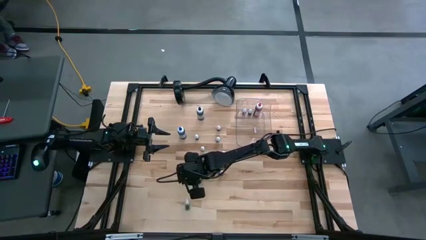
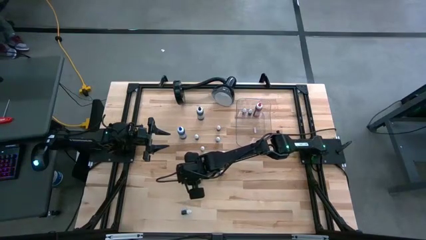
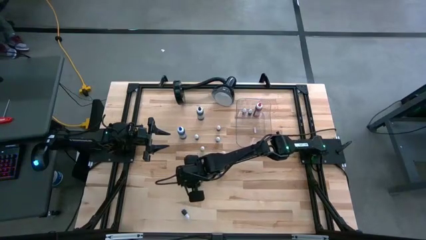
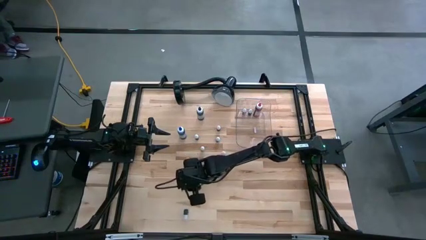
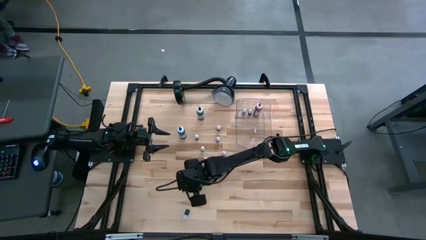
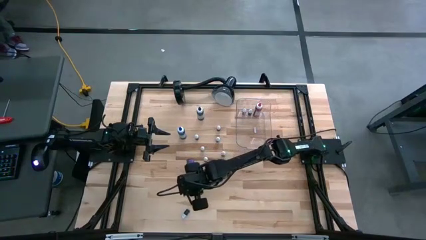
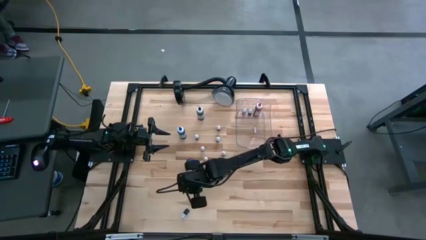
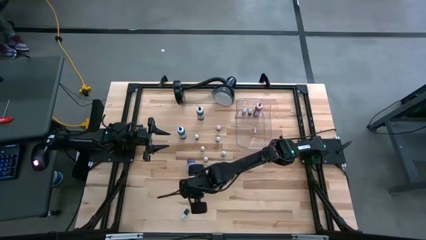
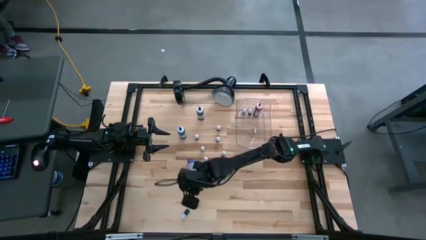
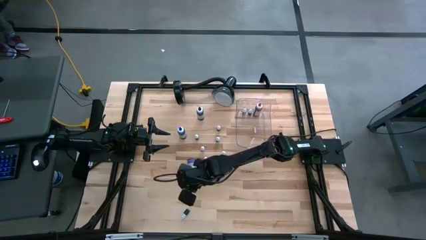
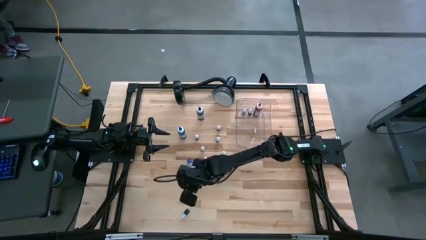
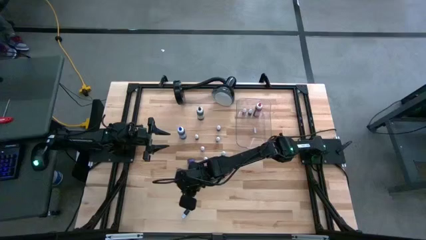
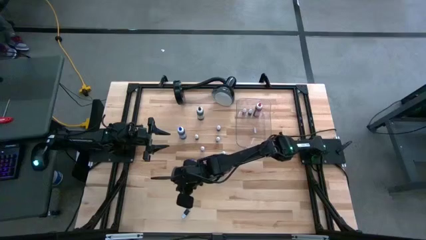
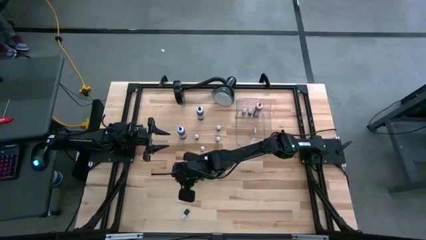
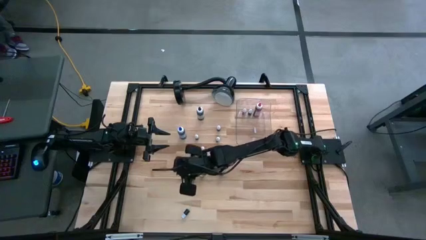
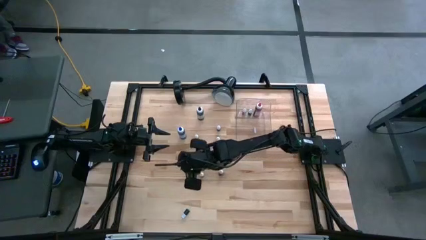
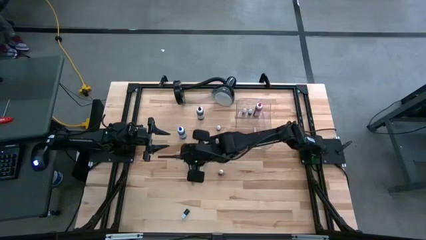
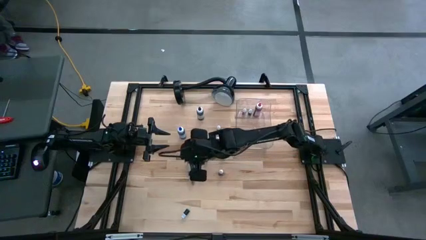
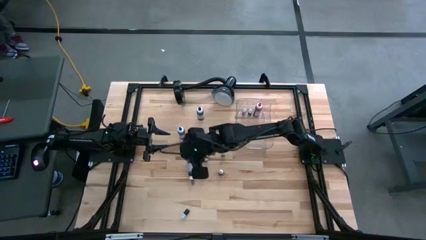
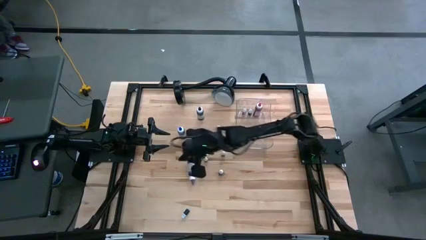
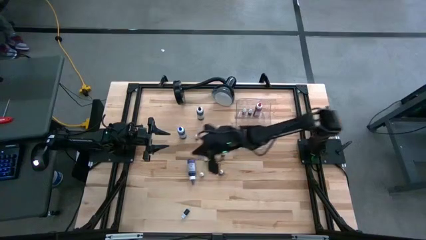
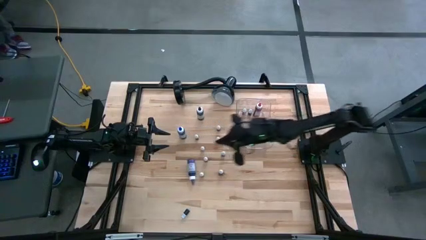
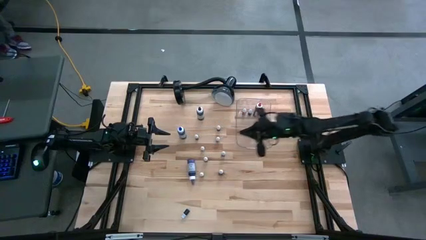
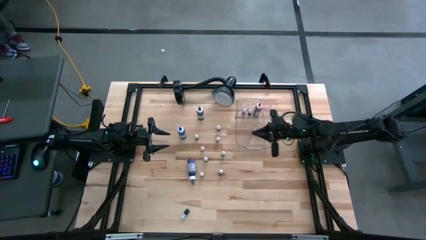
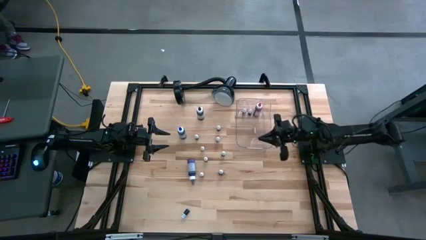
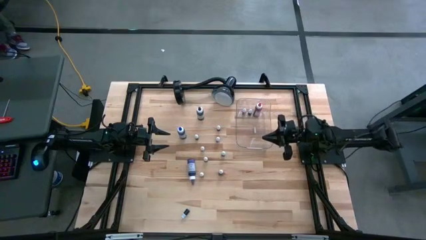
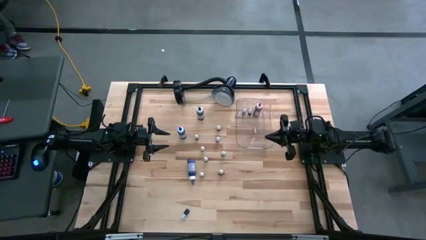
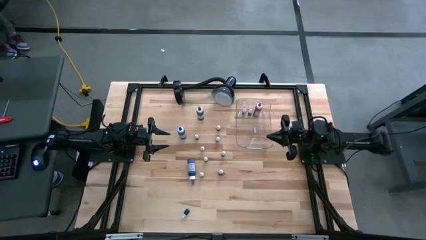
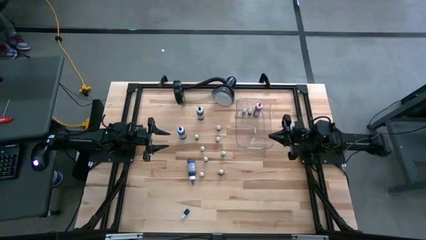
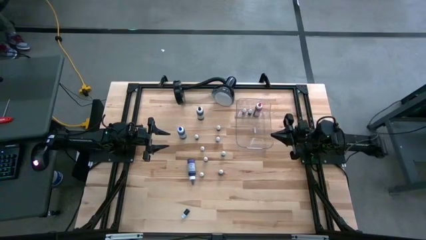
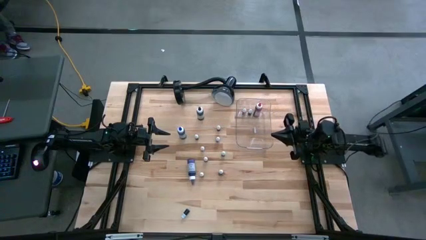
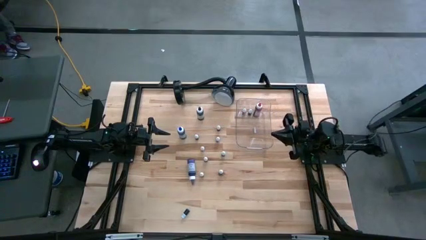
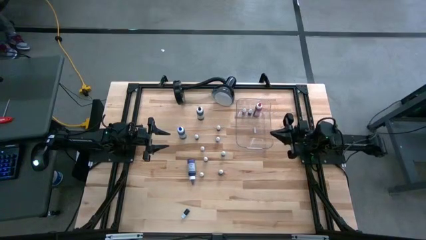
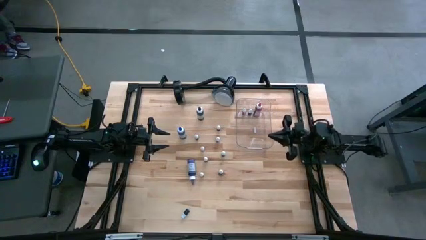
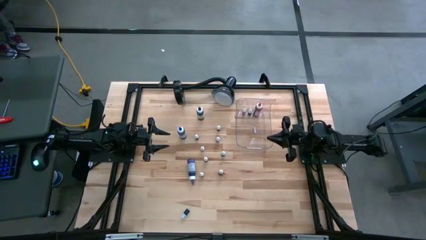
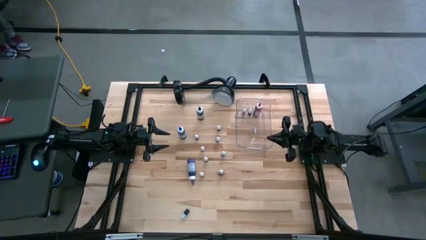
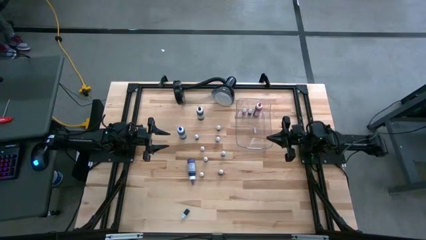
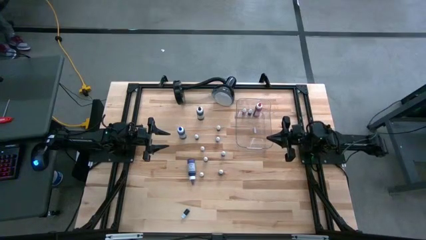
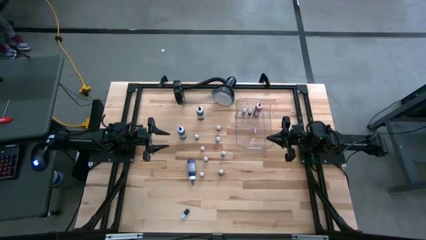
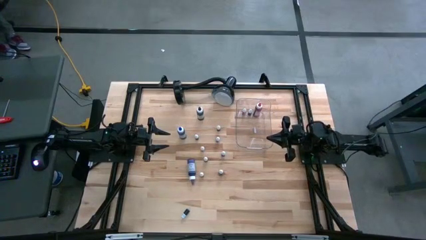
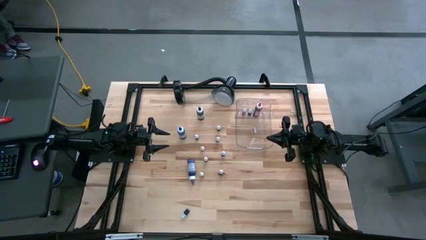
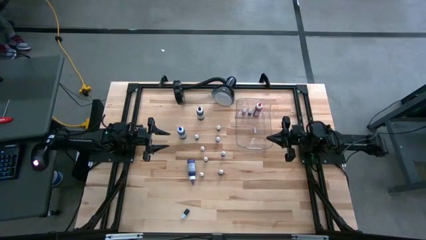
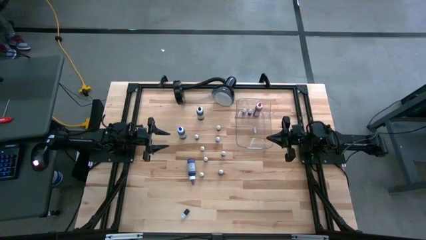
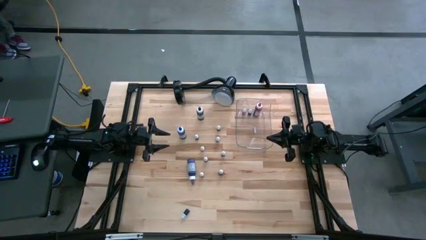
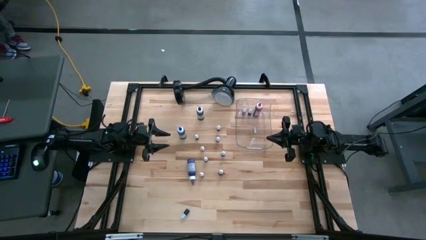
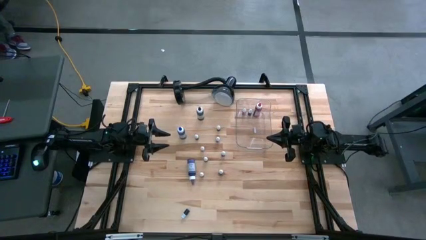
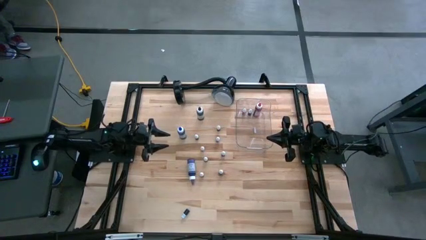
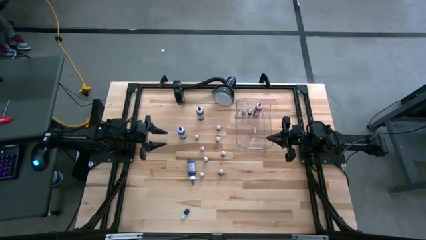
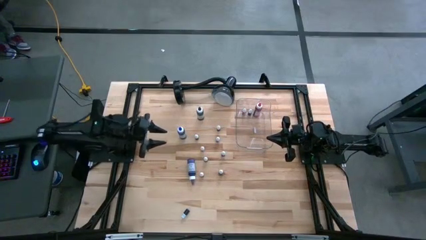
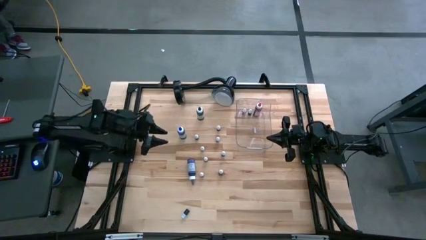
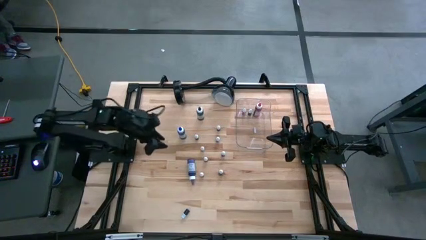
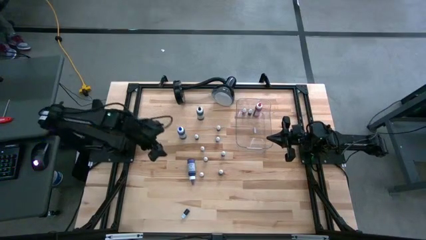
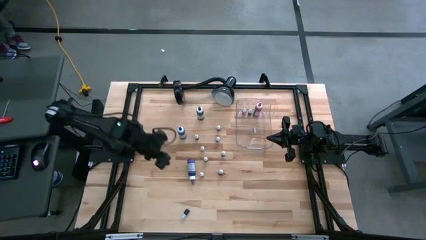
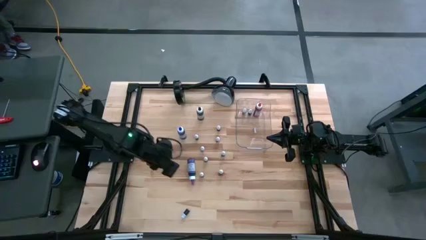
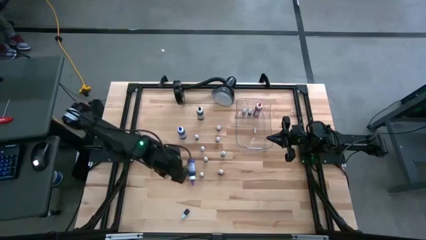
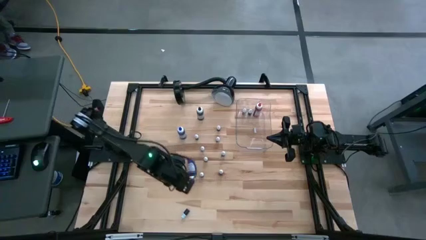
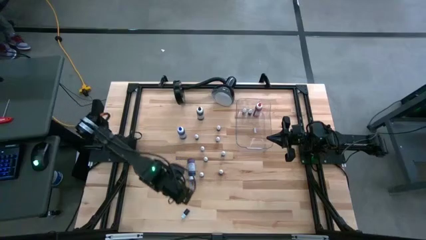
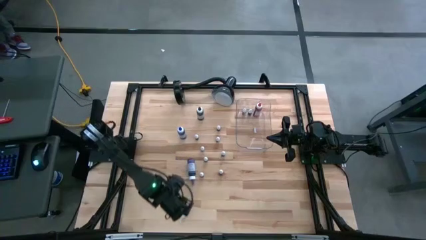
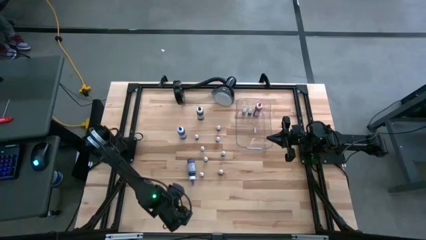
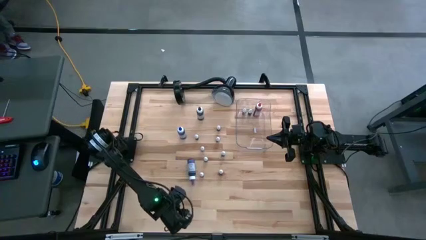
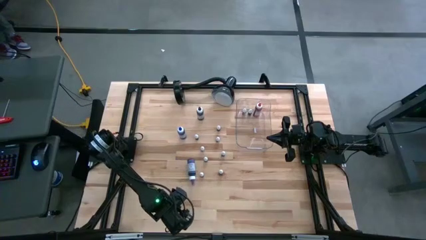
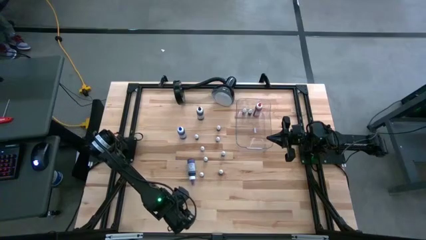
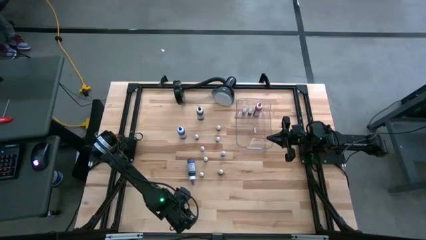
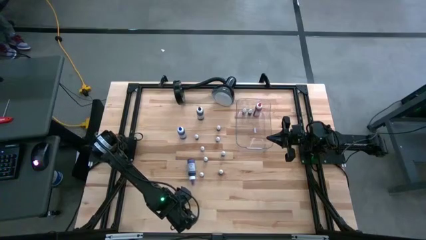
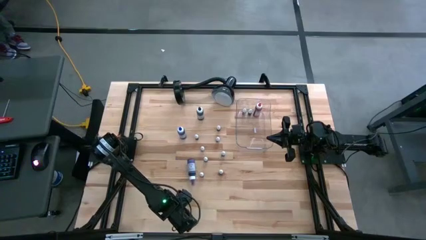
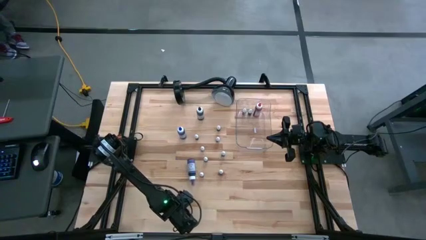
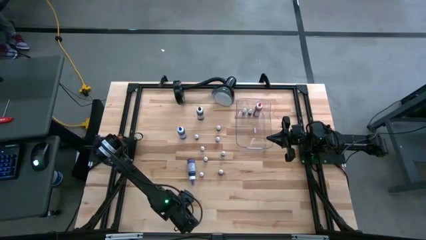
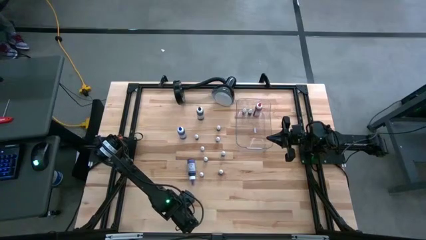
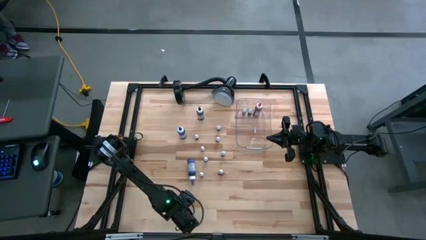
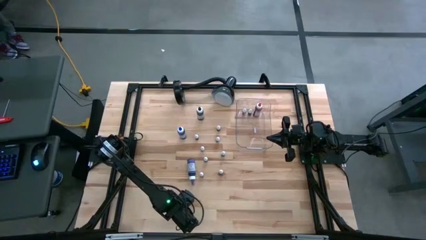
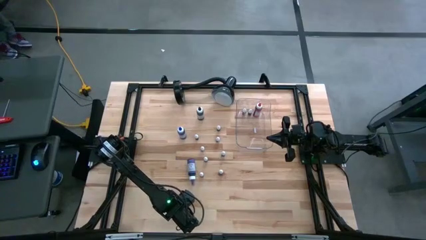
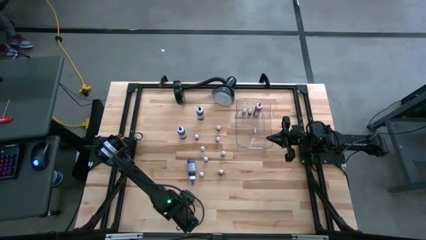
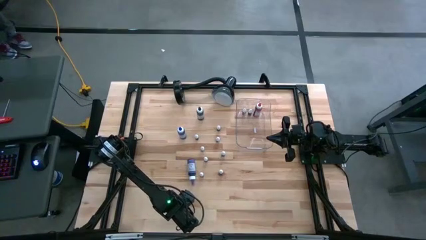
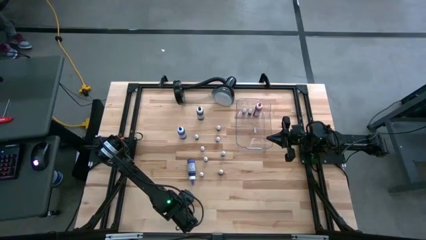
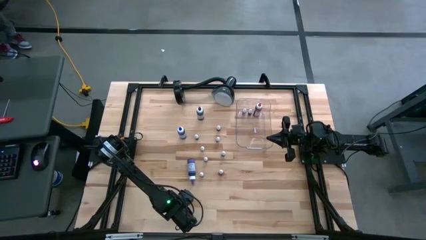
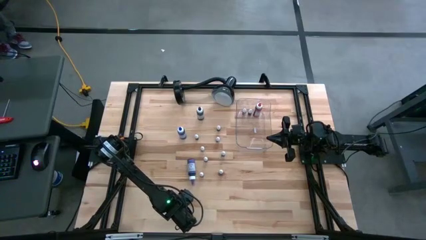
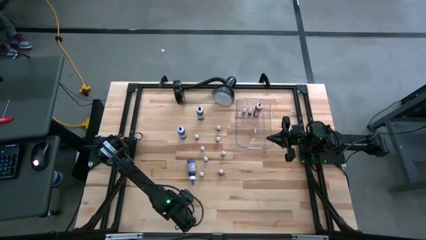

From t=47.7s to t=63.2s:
Task: Pick & Place food coloring
Put the small blue food coloring bottle into the transparent bin

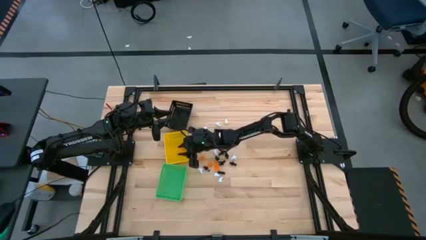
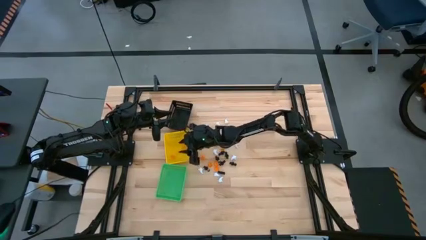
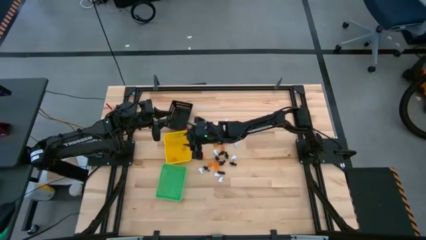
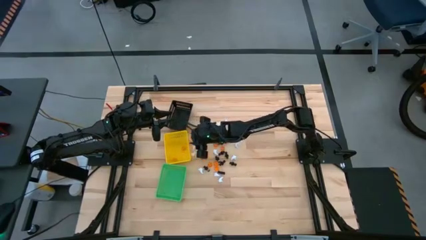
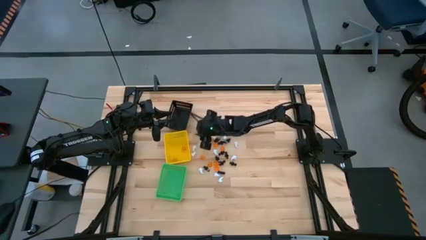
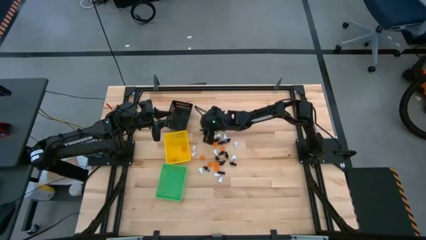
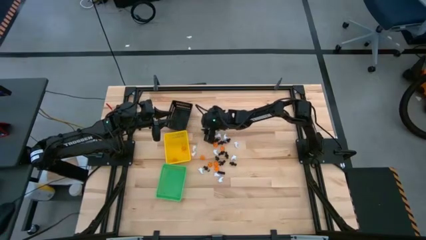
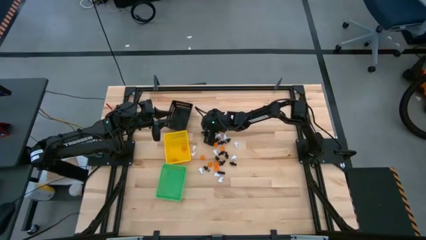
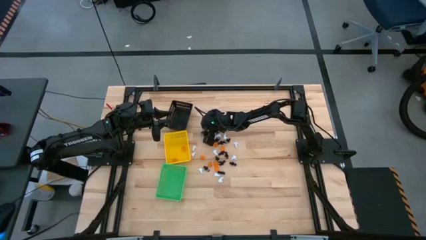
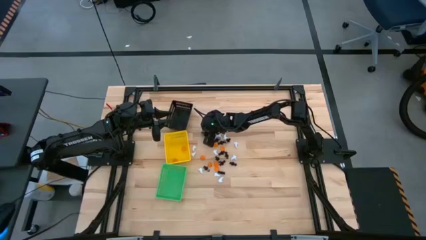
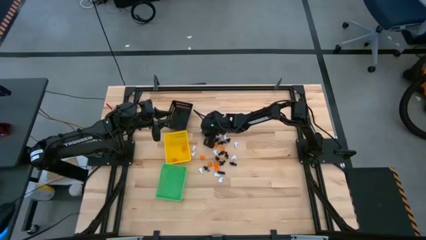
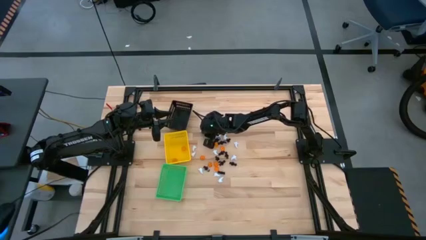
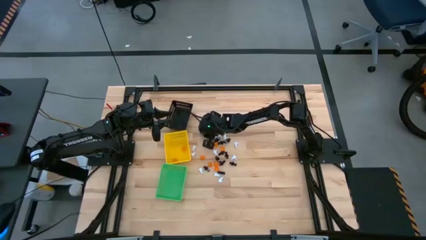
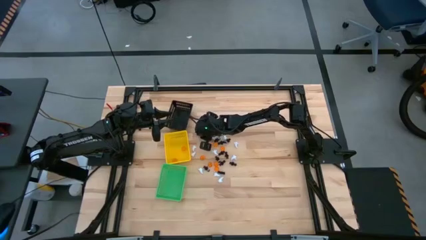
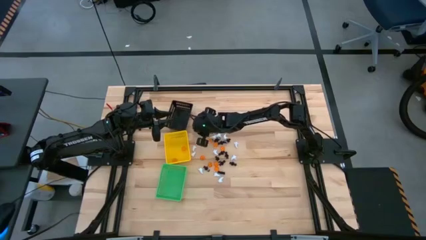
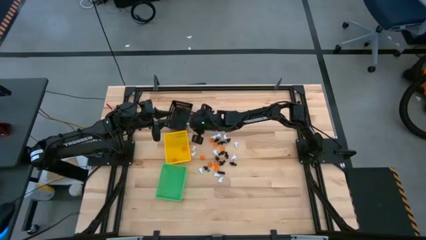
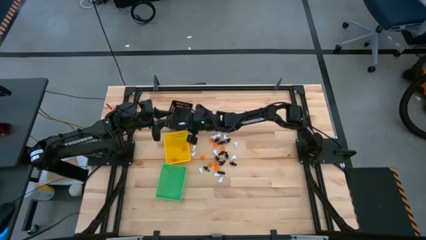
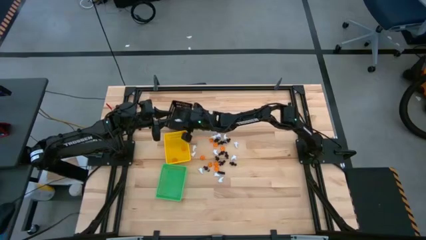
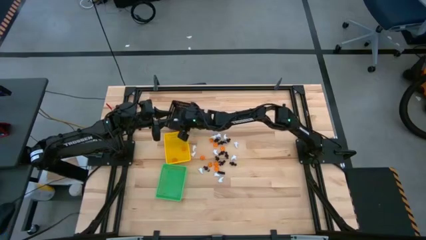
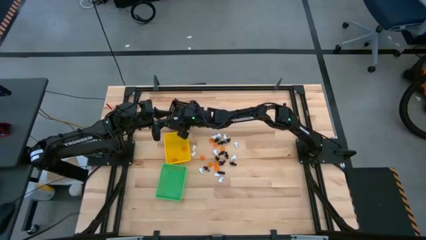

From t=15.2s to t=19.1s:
Task: Sort Halloween decoration
Put the white ghost plush toy into the black basket
